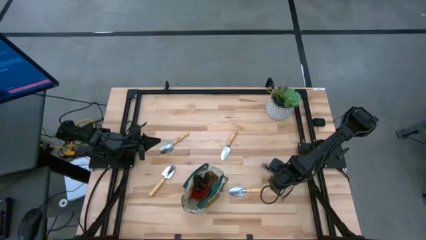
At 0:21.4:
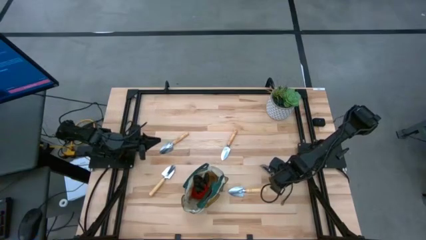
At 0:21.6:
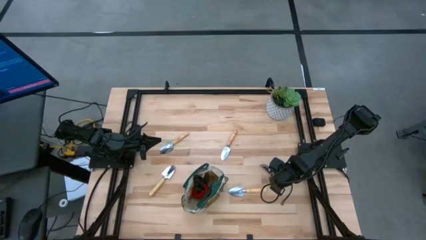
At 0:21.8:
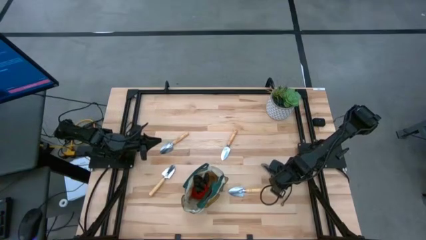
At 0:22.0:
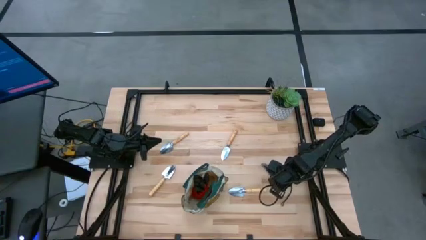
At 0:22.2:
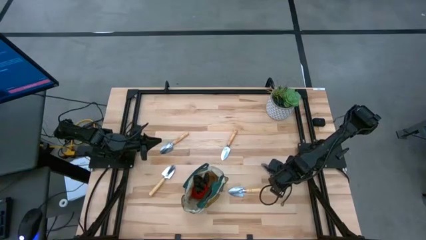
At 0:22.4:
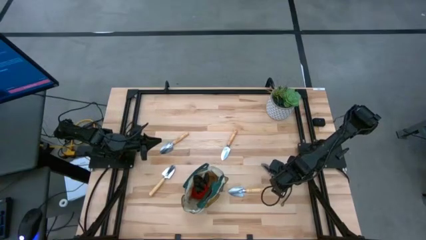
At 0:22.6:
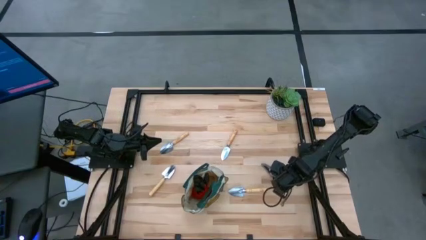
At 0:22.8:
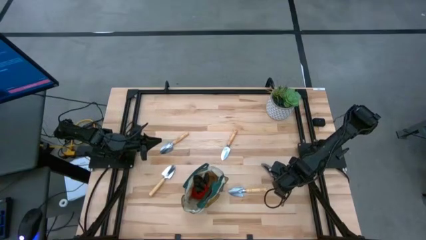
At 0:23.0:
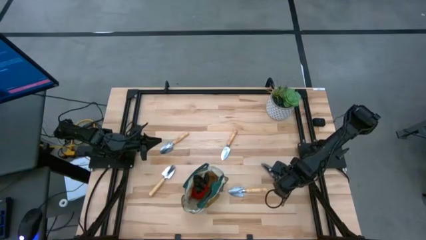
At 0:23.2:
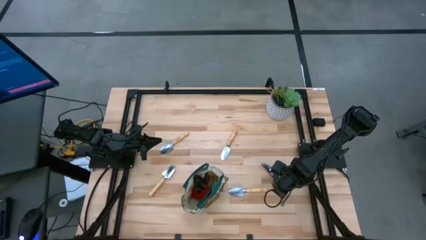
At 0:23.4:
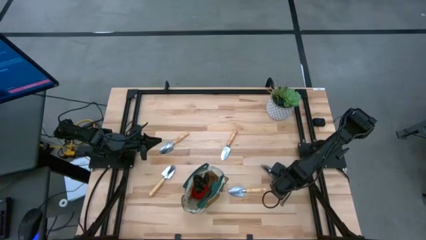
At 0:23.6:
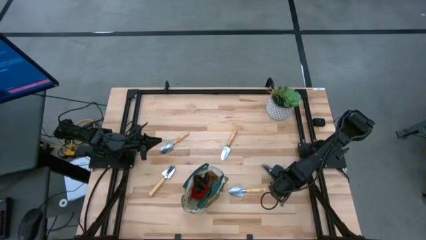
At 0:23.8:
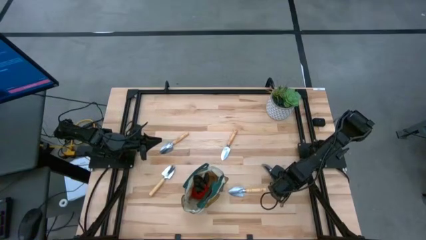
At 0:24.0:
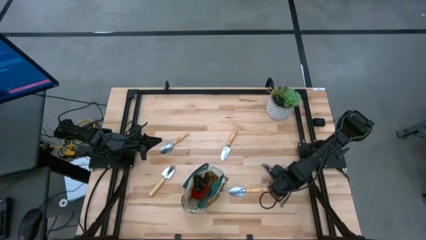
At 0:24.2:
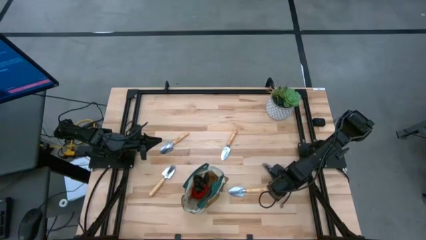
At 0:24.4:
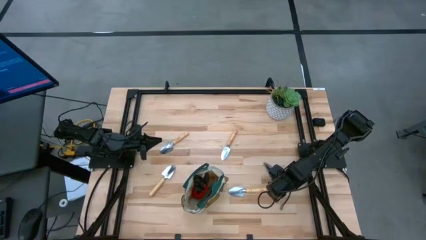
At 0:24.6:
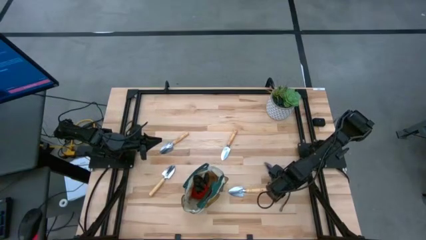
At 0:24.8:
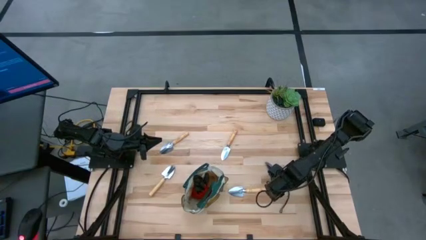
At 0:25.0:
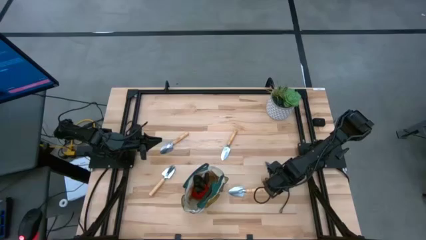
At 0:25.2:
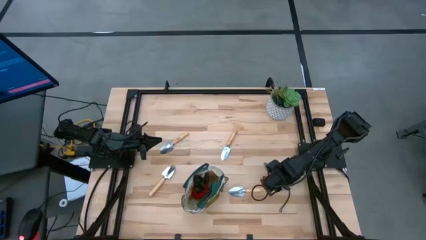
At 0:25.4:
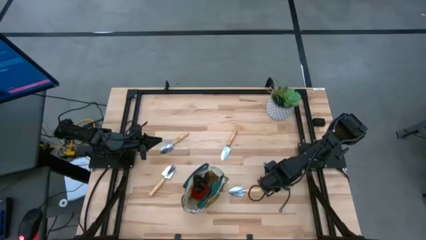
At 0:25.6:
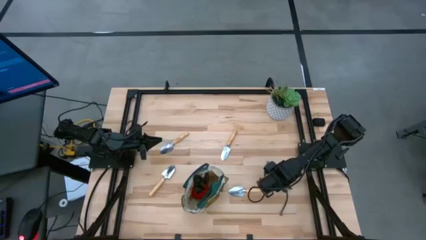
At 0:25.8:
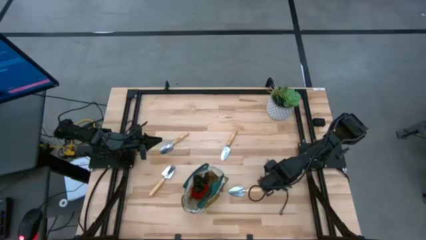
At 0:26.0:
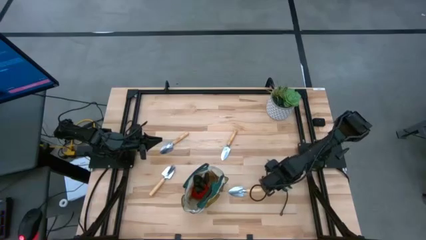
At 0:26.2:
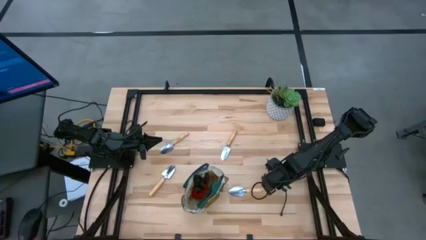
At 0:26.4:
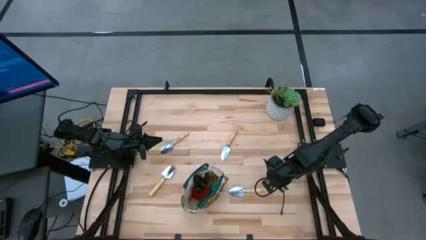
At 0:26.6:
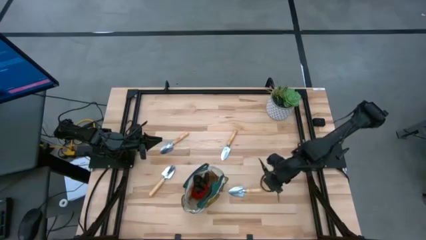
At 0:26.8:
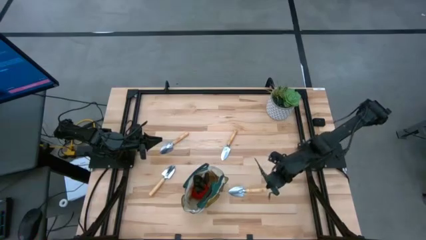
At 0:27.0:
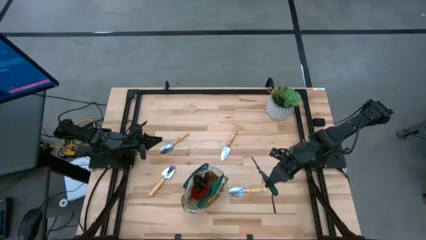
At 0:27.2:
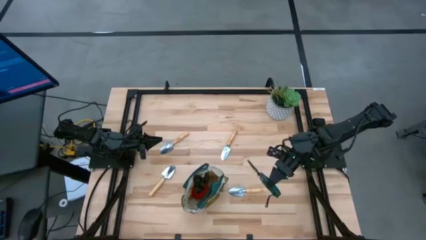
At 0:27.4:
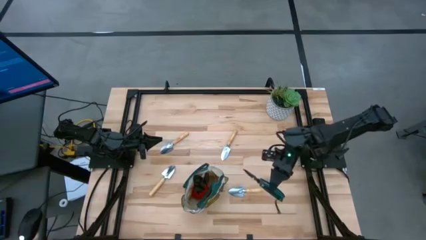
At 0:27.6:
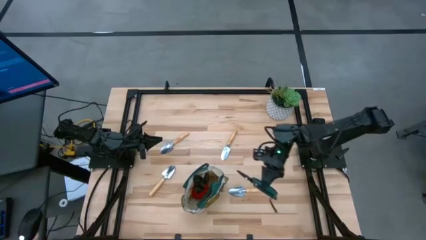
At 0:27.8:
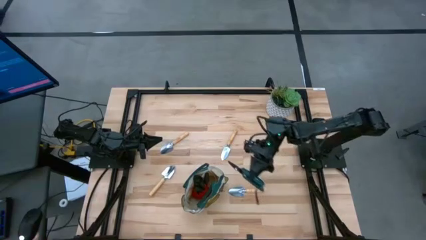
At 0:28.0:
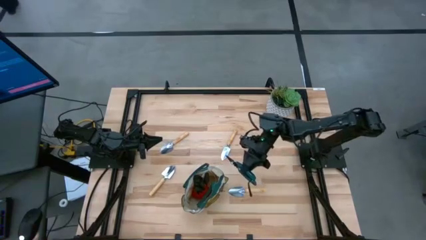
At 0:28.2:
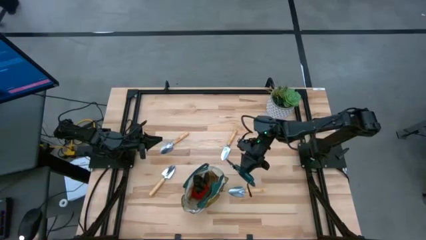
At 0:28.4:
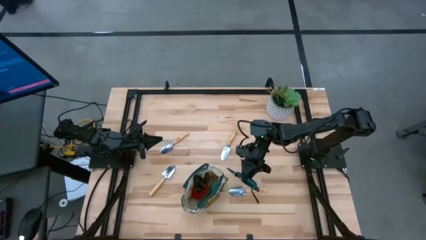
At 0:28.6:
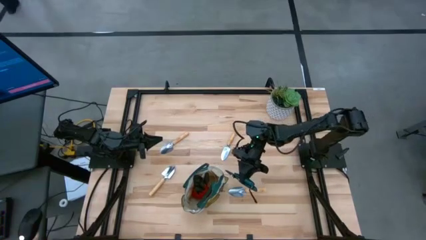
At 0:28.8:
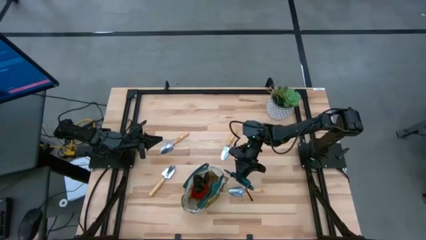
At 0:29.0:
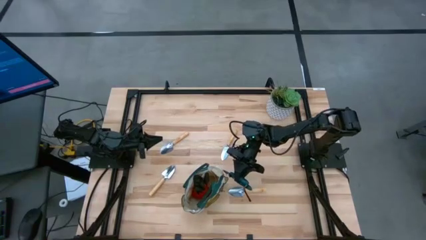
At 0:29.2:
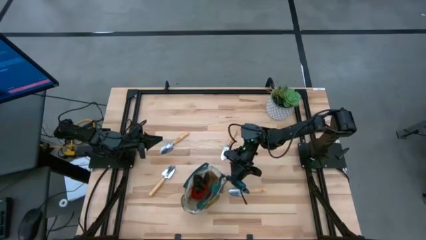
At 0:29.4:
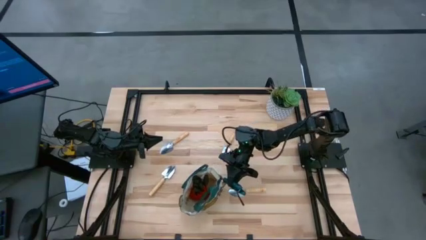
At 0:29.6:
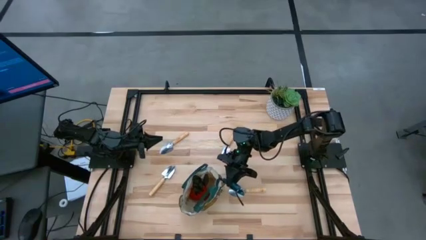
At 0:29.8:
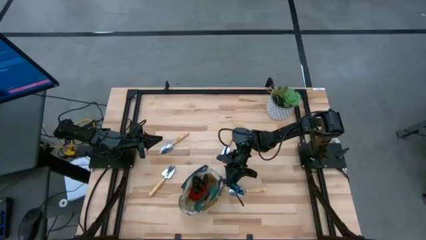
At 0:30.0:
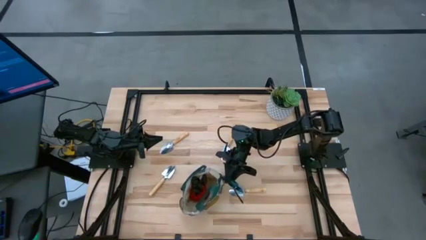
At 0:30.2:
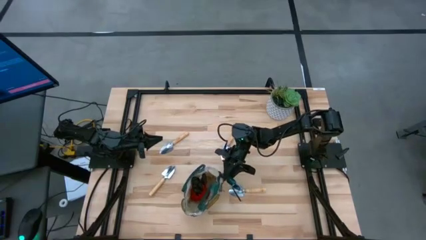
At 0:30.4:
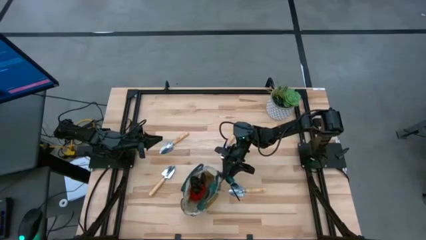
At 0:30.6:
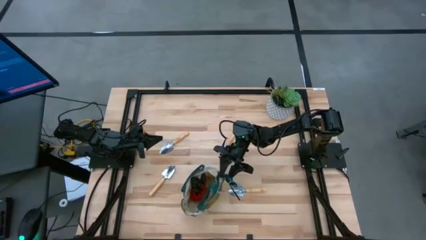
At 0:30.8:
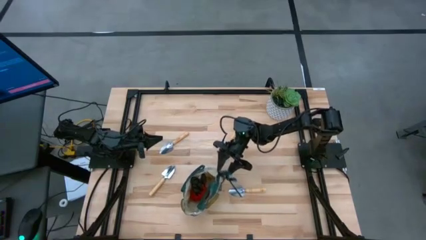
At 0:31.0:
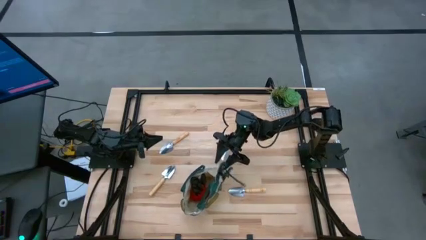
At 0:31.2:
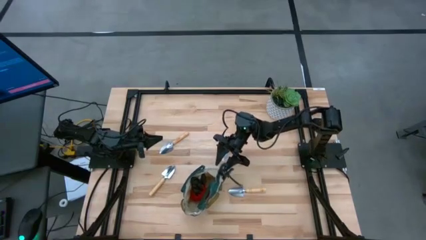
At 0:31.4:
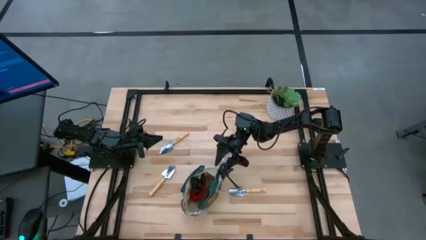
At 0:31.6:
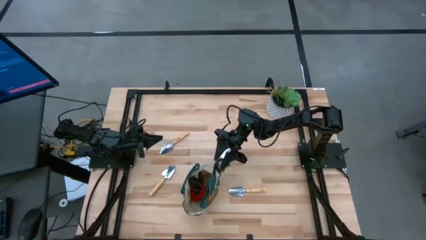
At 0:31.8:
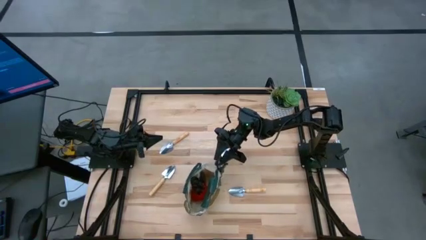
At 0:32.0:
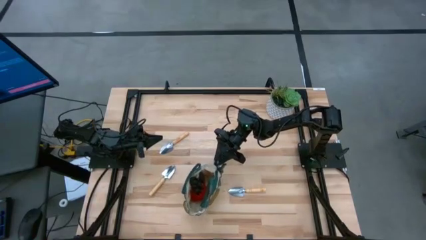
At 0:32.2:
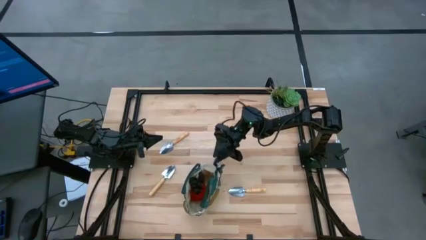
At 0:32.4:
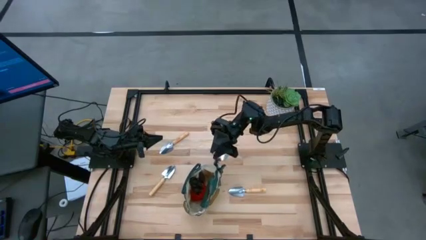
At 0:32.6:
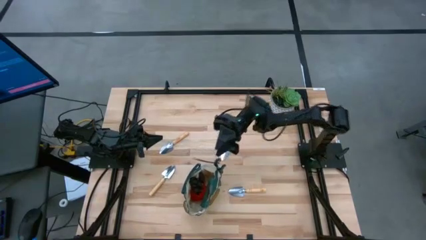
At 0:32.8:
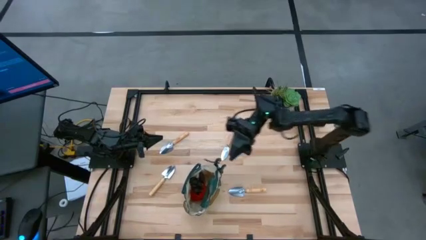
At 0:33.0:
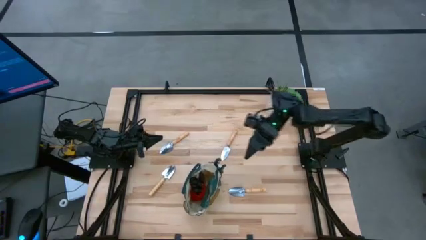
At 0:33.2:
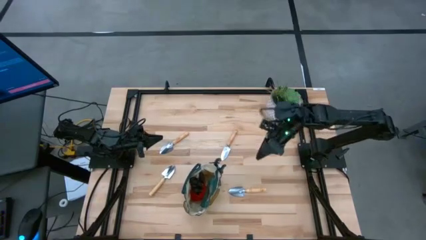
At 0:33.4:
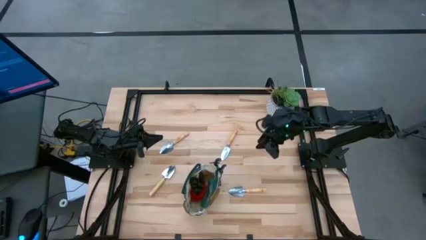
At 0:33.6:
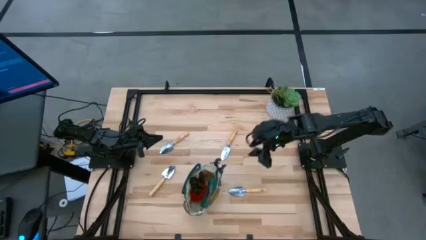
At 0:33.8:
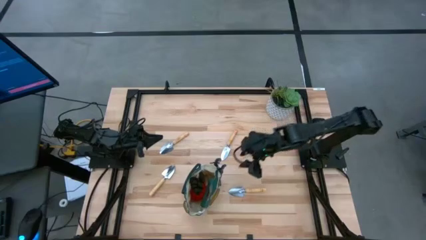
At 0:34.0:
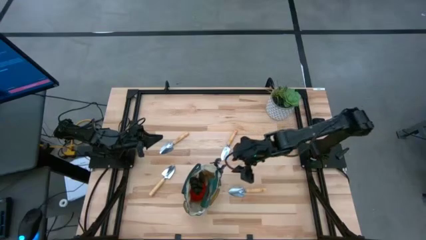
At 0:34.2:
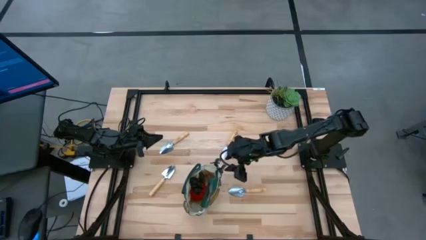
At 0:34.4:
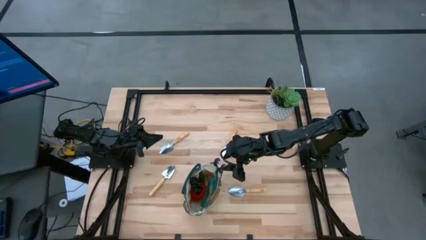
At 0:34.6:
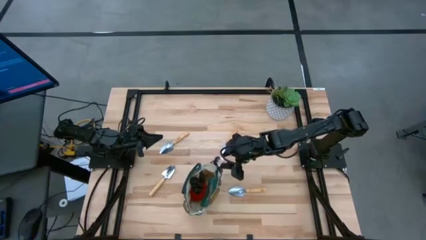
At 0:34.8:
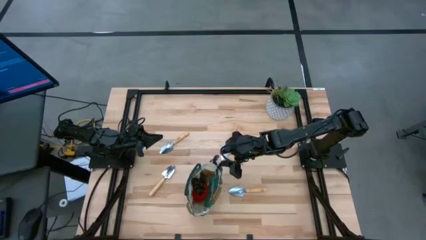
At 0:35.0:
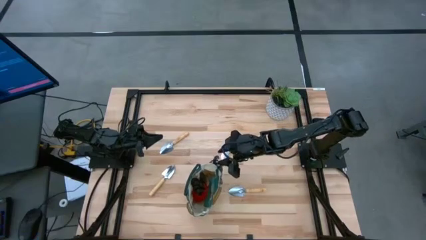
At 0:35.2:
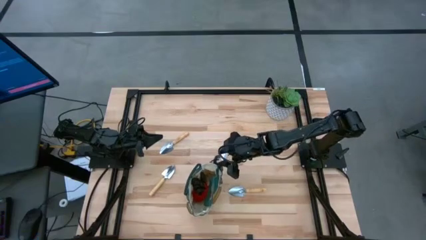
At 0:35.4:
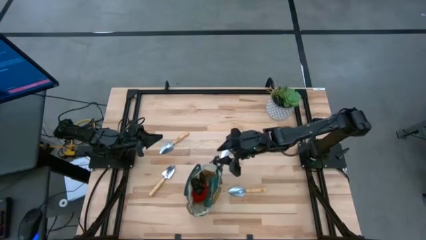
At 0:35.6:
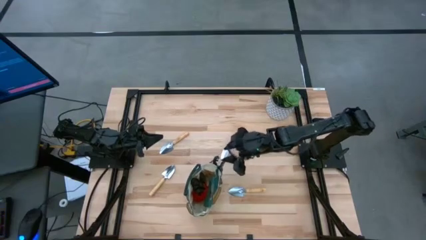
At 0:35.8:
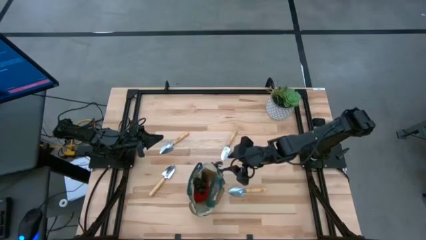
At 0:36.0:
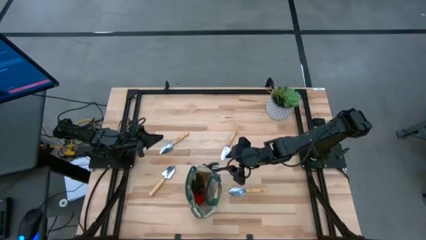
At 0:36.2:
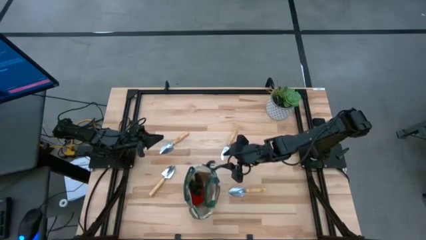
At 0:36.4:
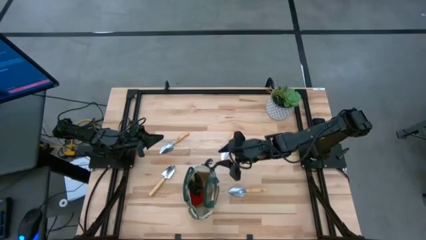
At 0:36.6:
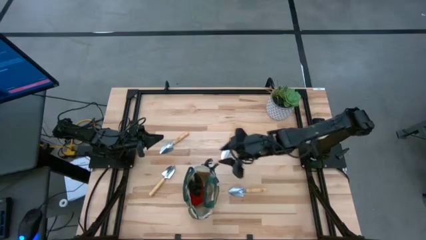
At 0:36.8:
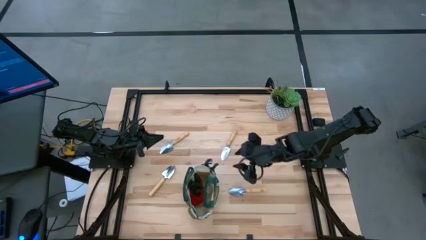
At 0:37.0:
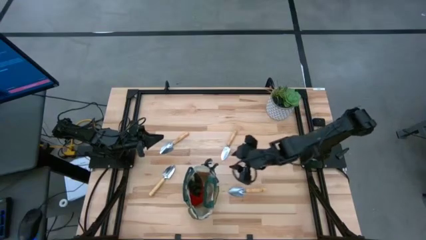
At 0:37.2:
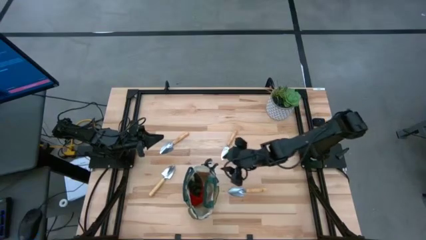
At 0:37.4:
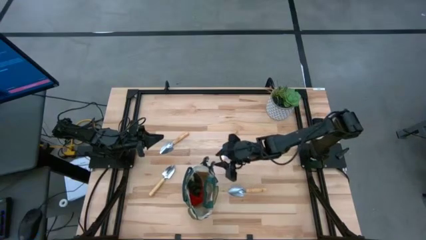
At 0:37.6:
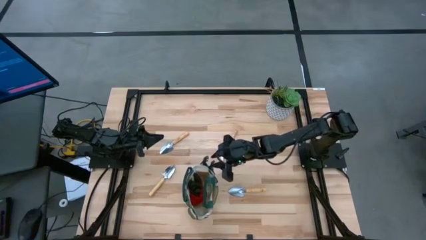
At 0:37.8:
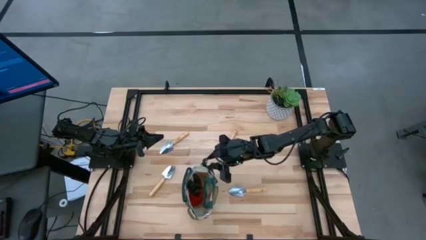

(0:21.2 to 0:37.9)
Task: Pick & Place Garden tools in Gardening bag
Put the green shear scissors into the gardening bag
